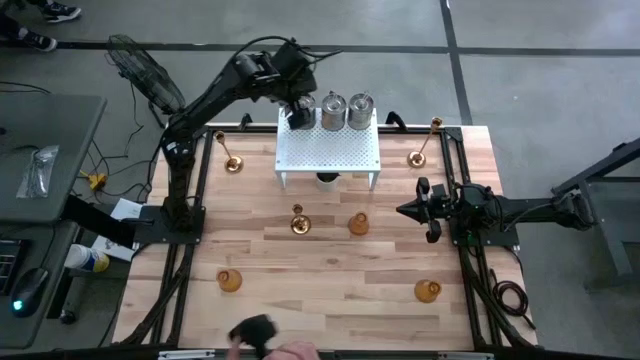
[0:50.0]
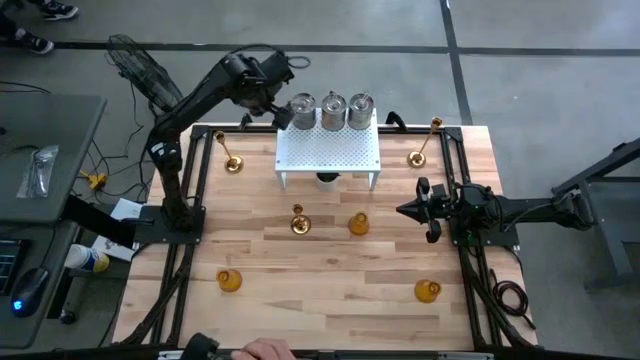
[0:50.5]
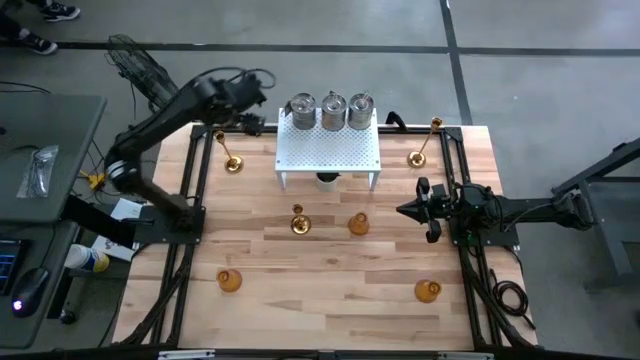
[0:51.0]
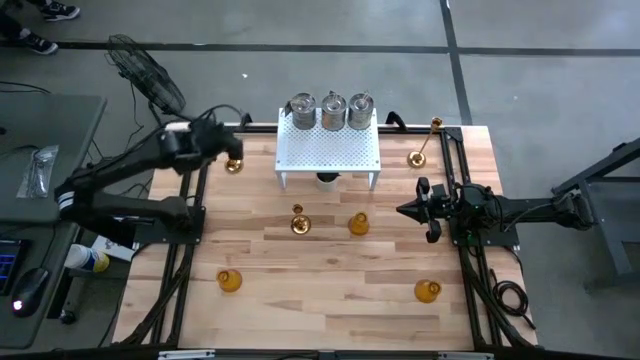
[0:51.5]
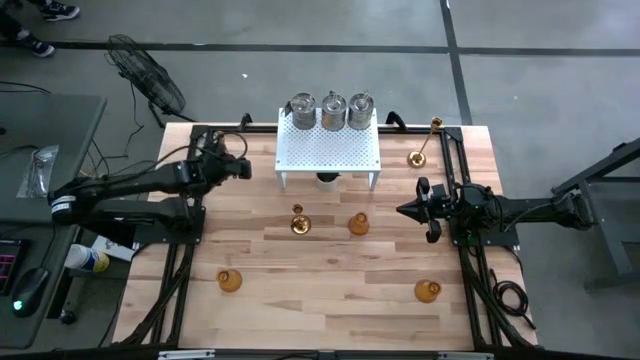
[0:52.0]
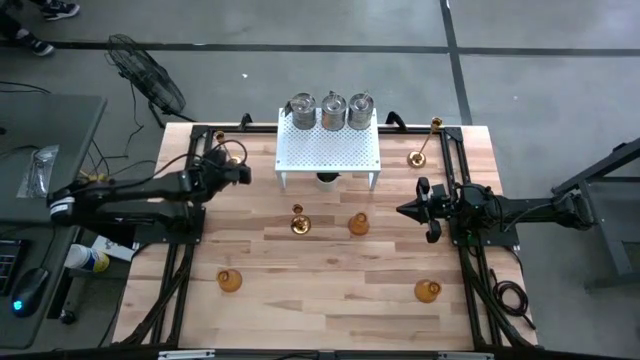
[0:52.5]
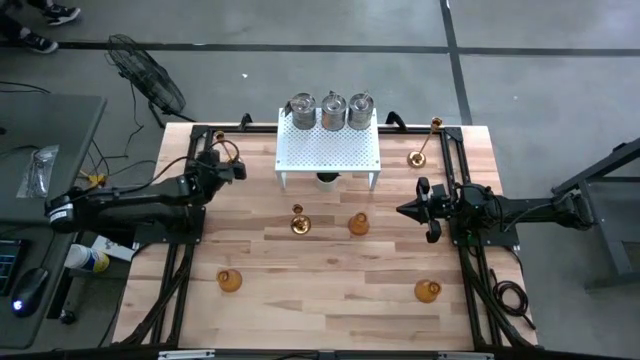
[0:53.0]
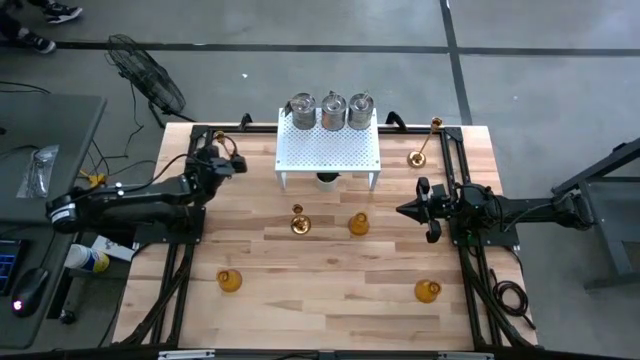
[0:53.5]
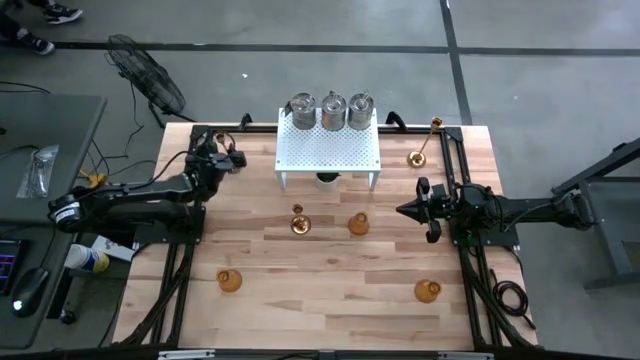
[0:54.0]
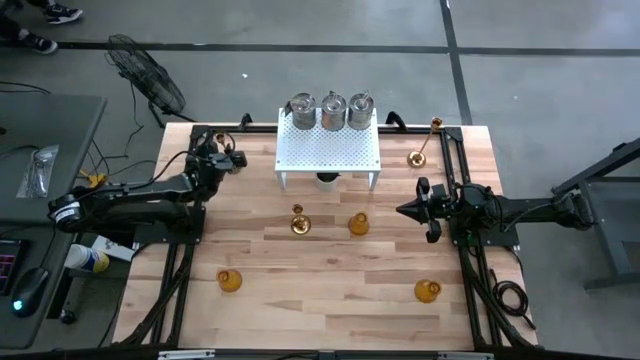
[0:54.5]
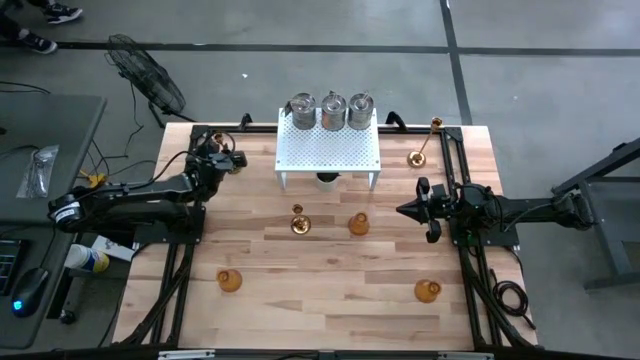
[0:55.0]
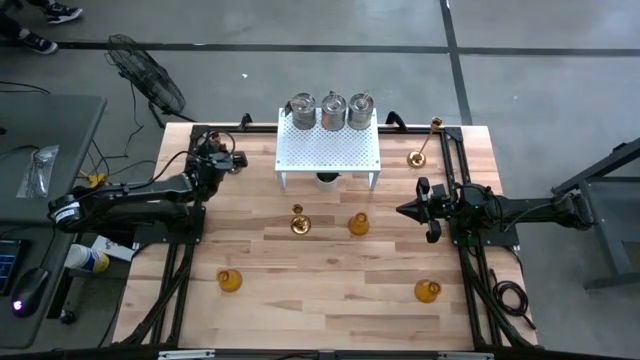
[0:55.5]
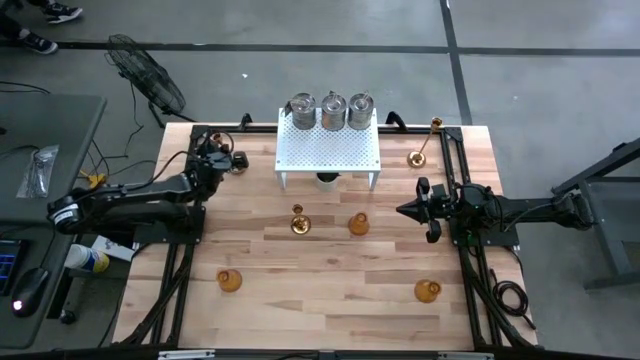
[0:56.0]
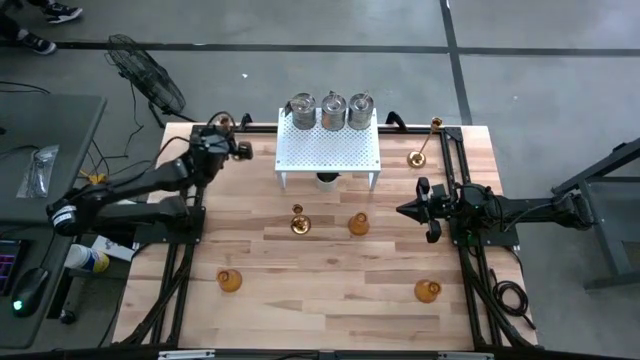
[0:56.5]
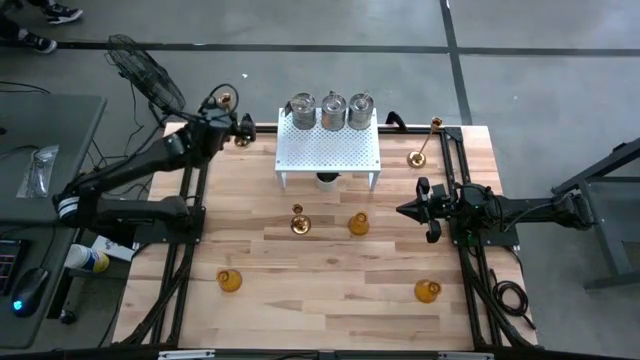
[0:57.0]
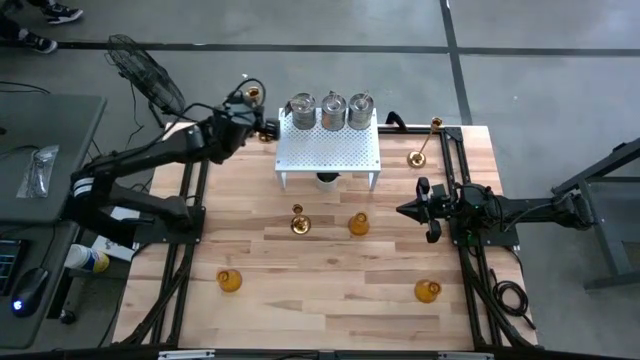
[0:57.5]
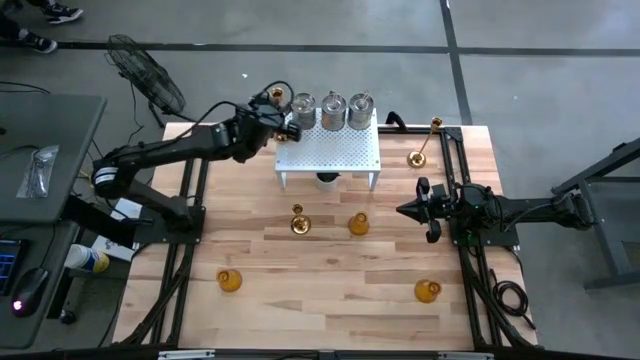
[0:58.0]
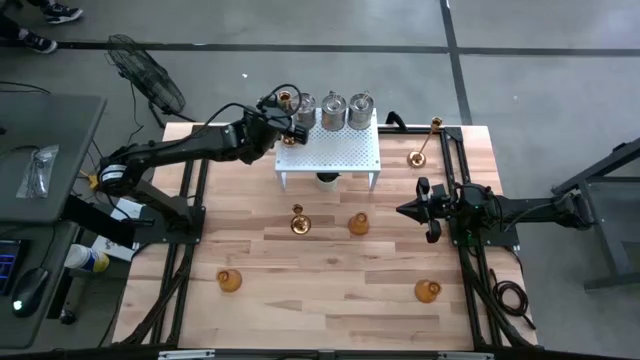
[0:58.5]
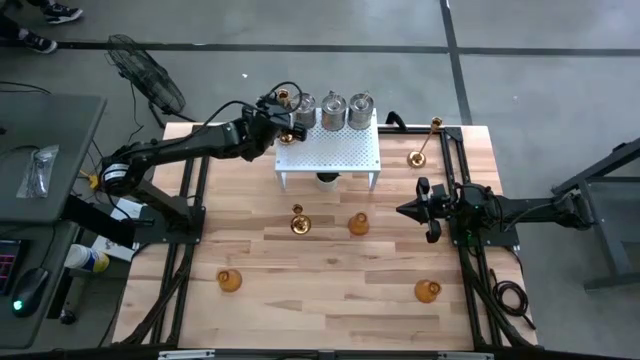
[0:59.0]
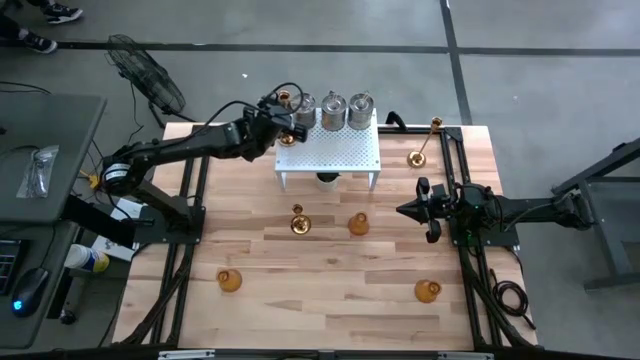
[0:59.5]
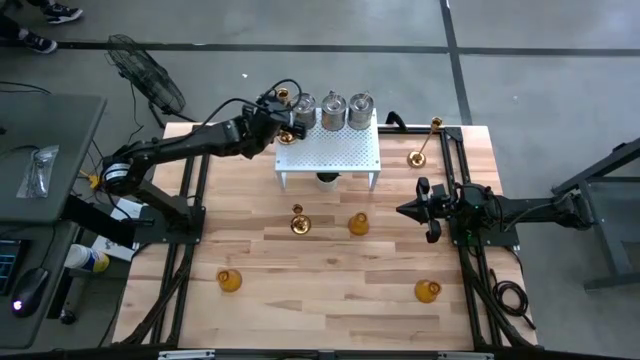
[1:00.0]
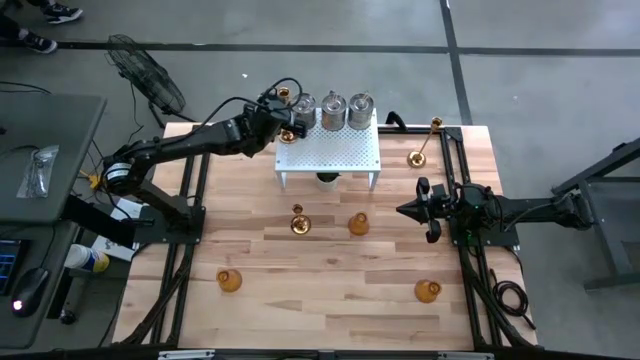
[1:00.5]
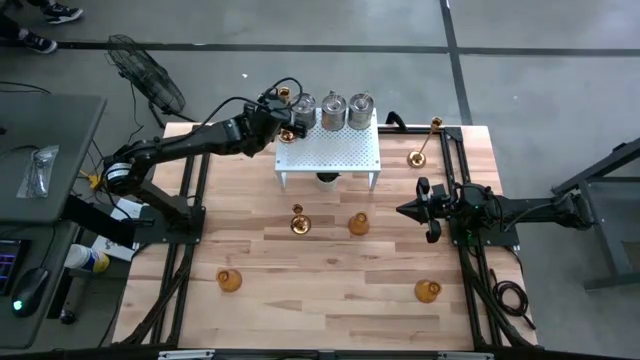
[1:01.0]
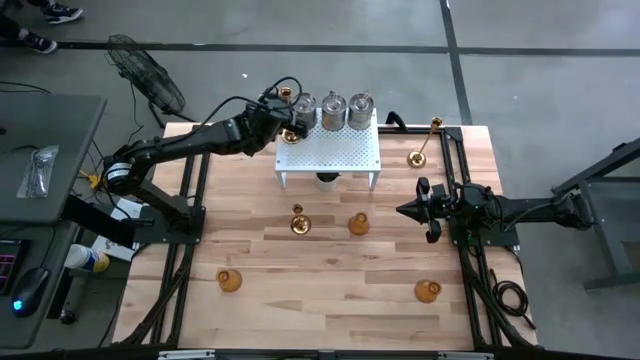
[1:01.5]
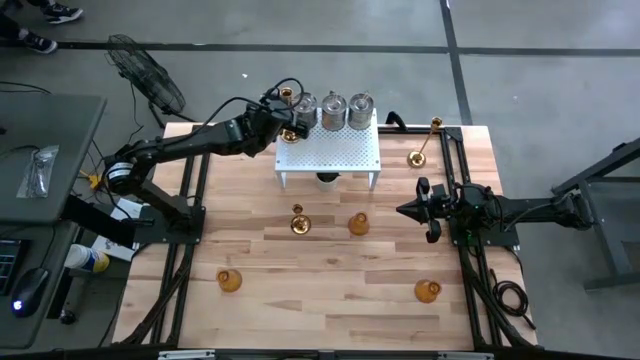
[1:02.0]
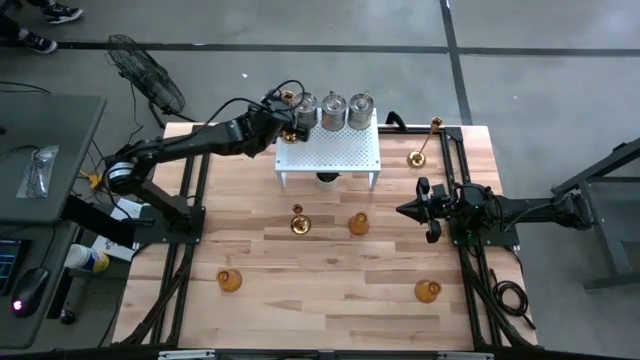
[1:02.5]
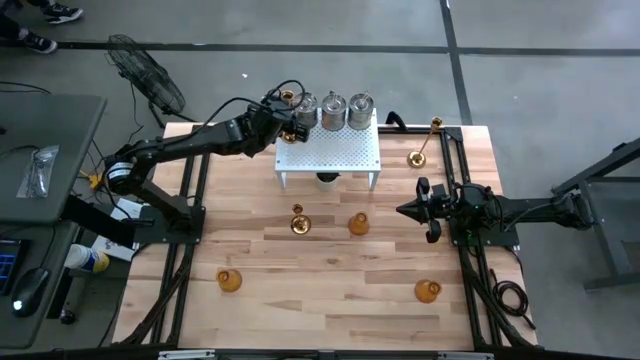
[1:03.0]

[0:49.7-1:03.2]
Task: Pick & Place candle stick holders
Put the top left gold candlestick holder on the shelf

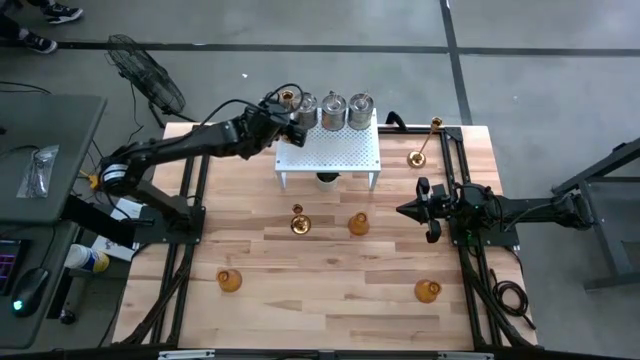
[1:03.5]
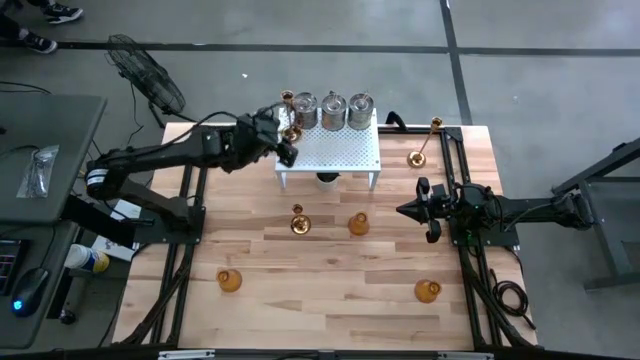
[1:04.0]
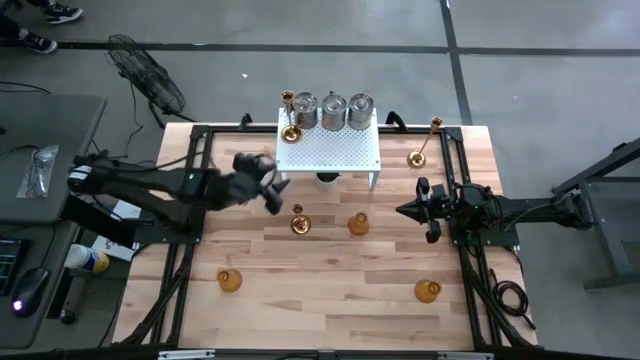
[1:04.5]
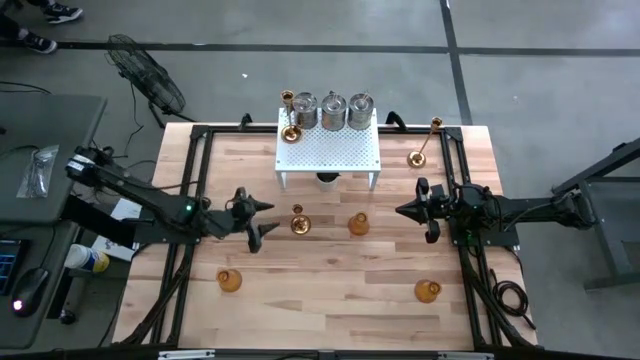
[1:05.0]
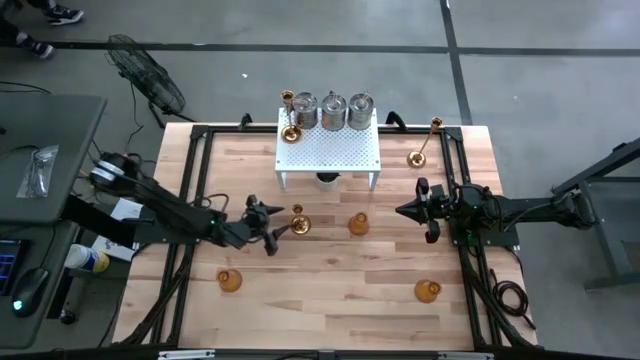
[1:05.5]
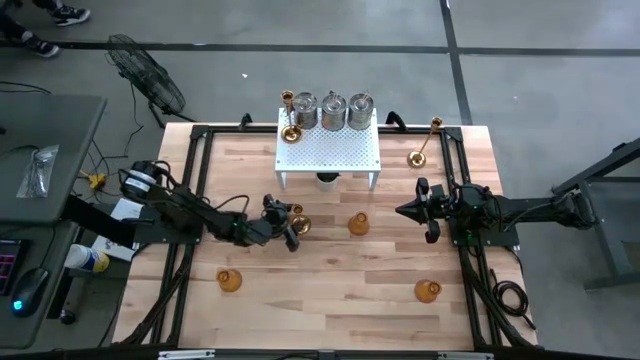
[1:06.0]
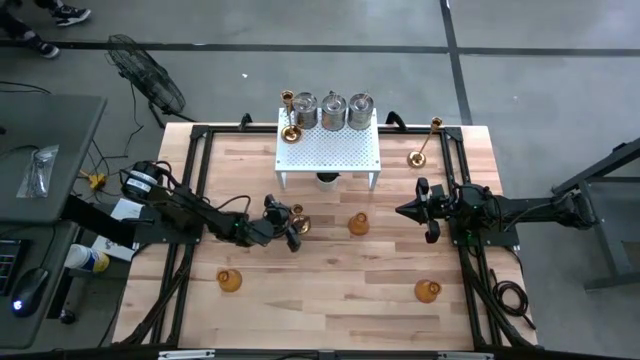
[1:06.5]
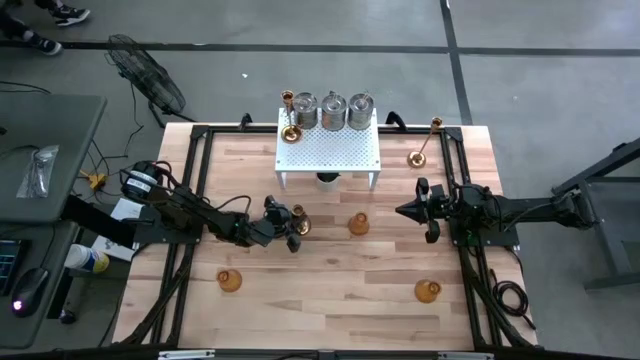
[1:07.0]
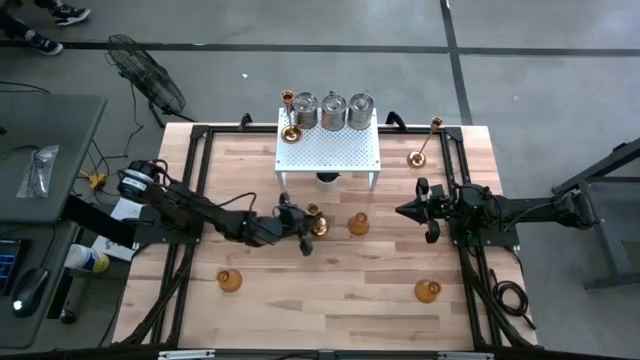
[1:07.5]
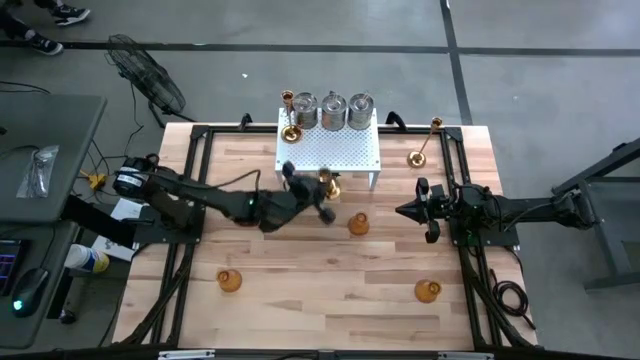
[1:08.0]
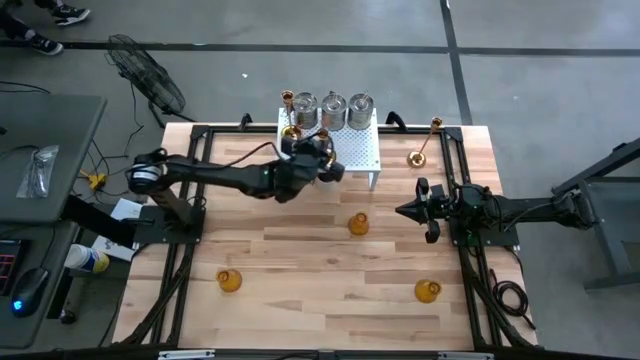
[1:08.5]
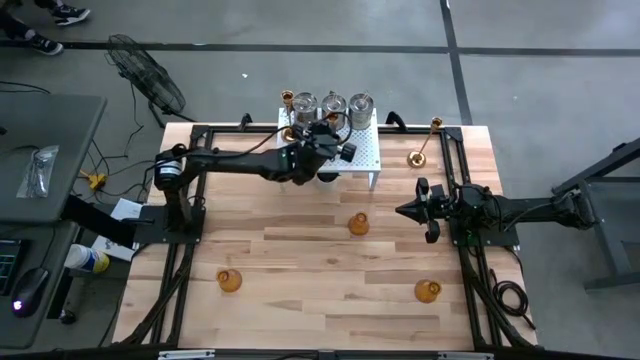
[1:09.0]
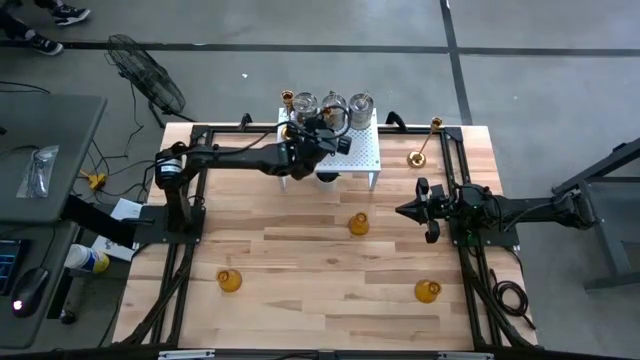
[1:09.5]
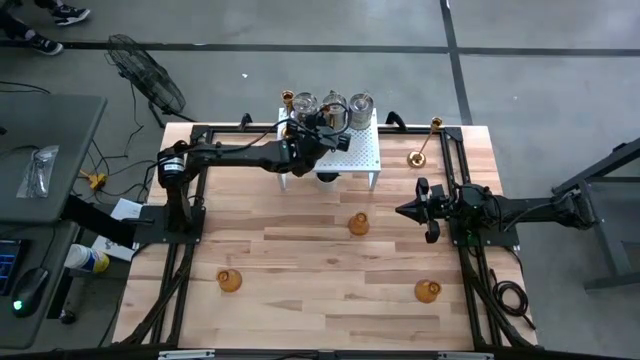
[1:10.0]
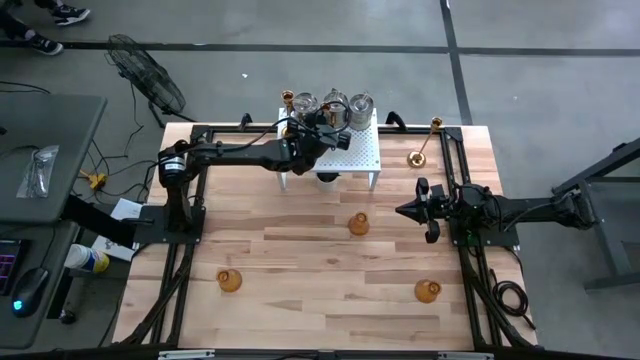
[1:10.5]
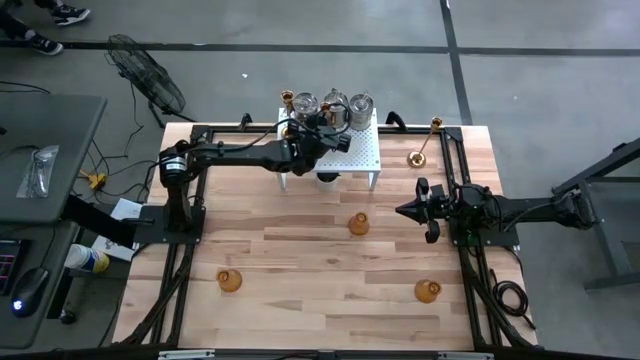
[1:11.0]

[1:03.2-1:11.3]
Put the middle left gold candlestick holder on the shelf
